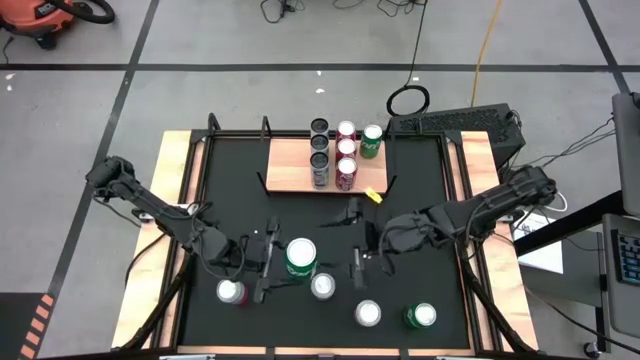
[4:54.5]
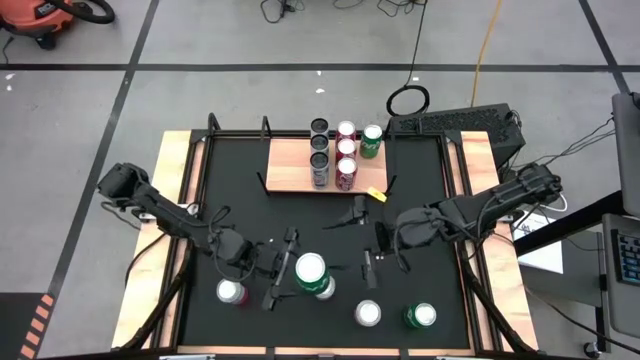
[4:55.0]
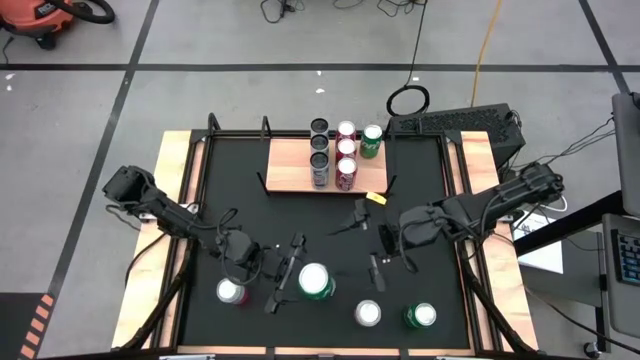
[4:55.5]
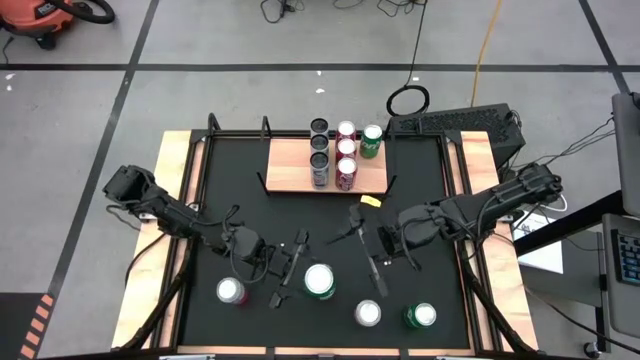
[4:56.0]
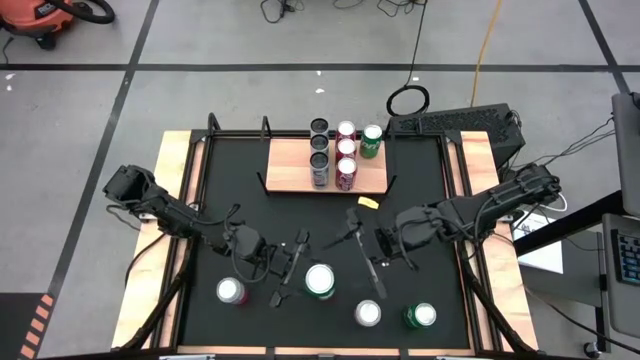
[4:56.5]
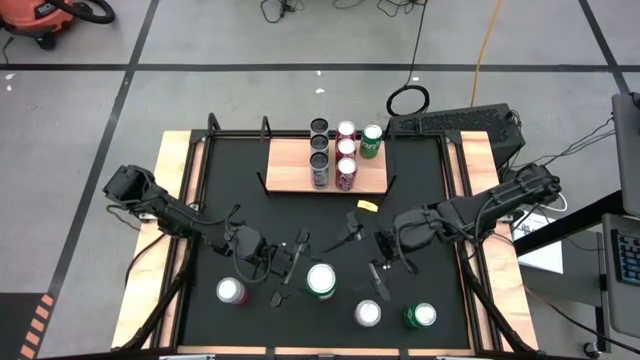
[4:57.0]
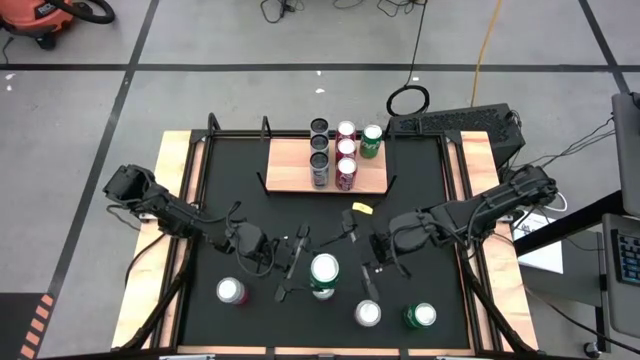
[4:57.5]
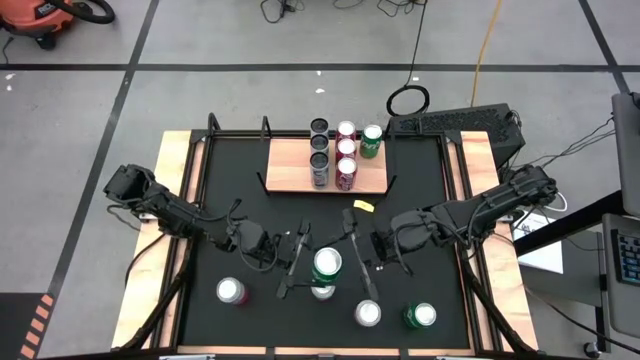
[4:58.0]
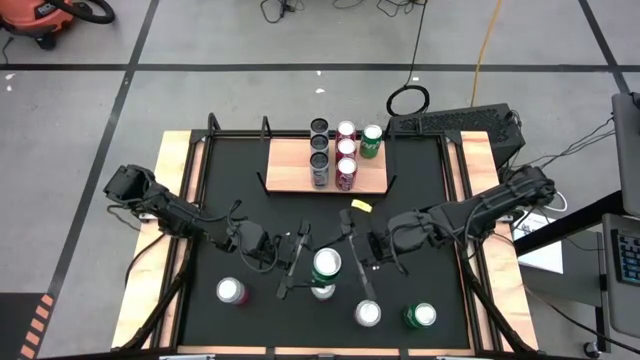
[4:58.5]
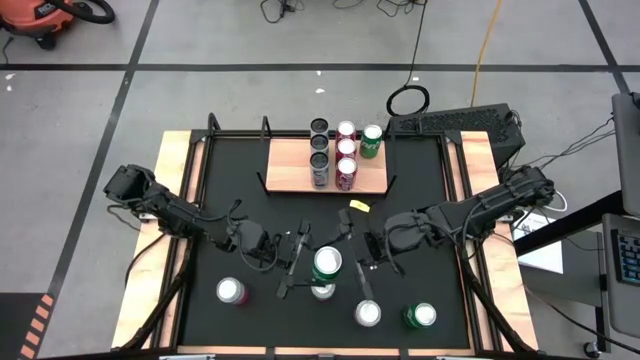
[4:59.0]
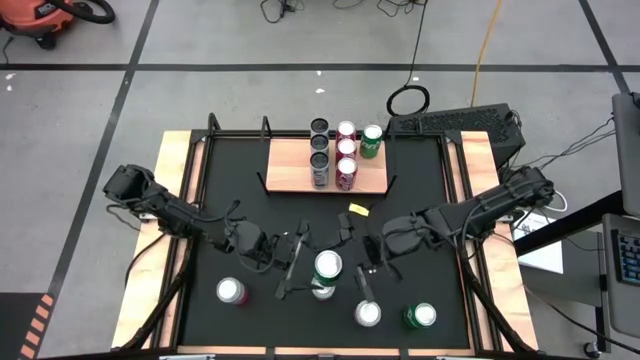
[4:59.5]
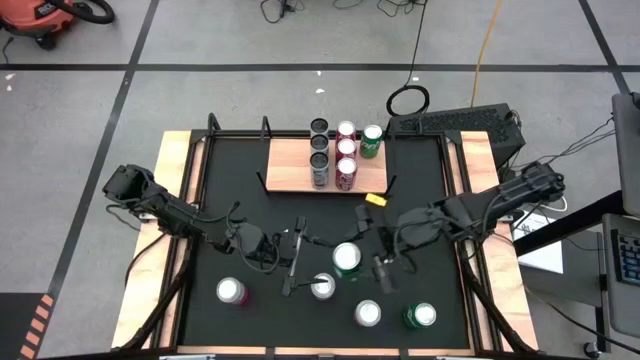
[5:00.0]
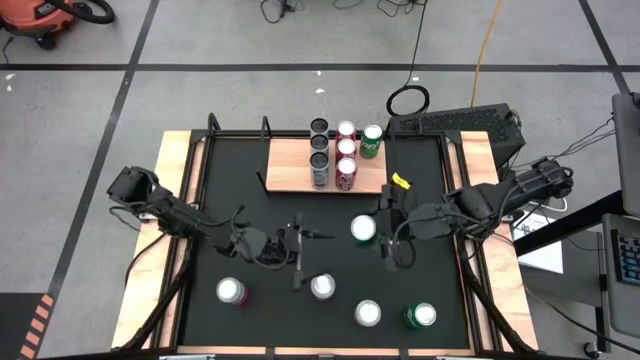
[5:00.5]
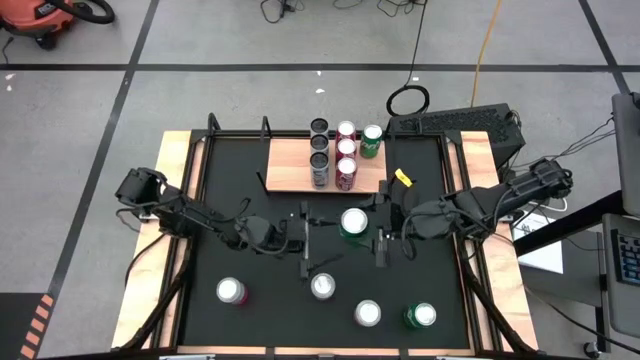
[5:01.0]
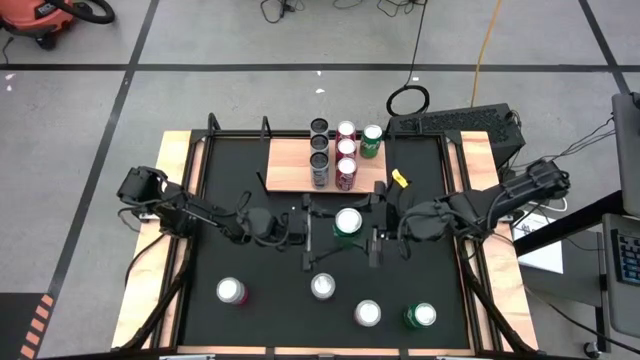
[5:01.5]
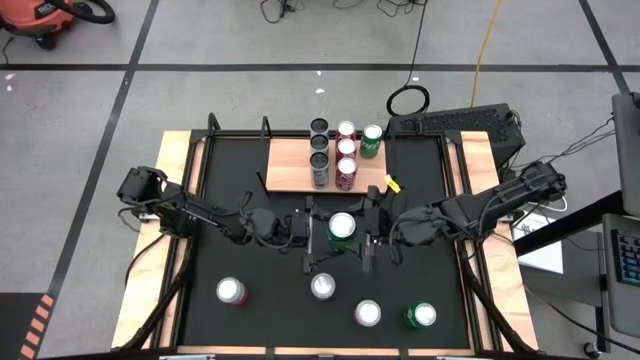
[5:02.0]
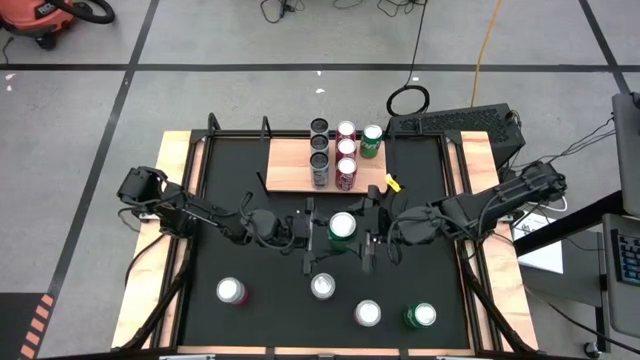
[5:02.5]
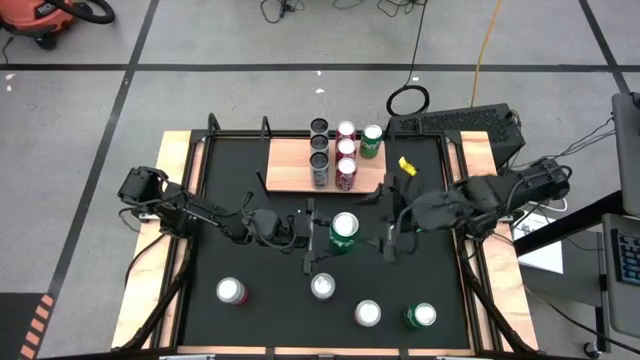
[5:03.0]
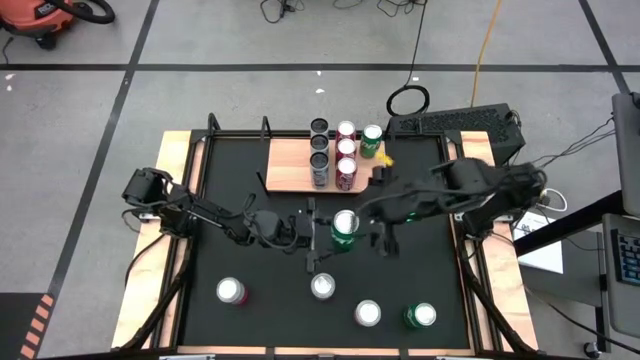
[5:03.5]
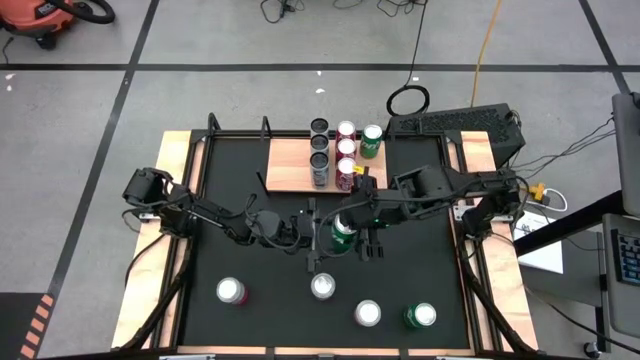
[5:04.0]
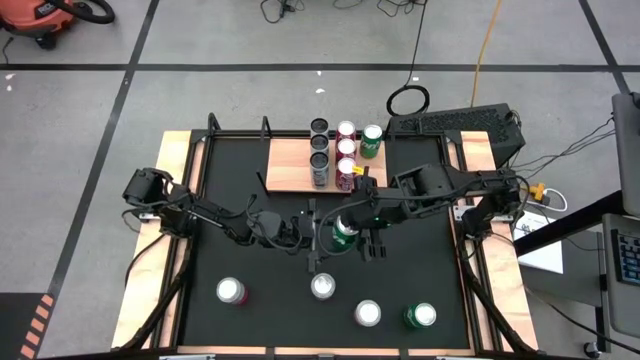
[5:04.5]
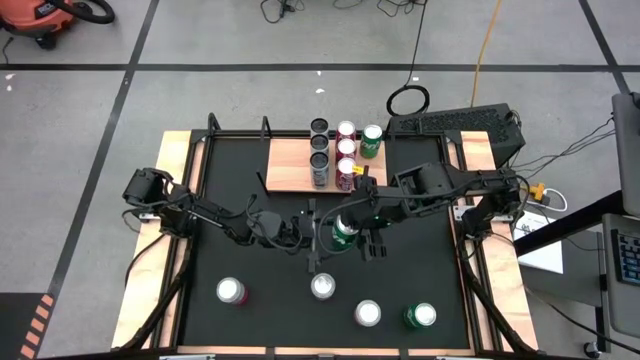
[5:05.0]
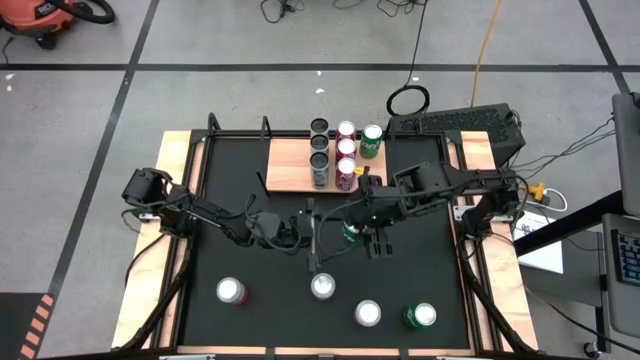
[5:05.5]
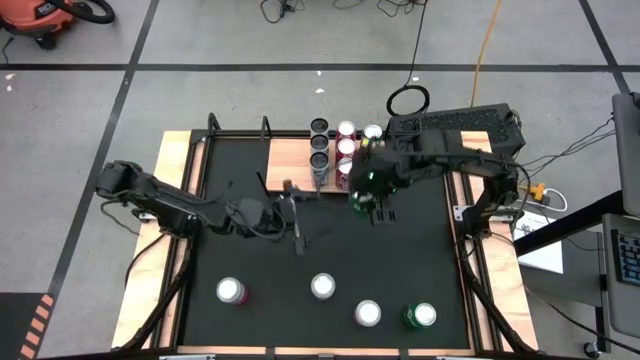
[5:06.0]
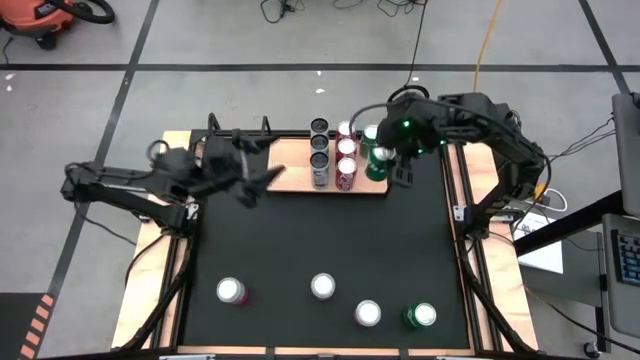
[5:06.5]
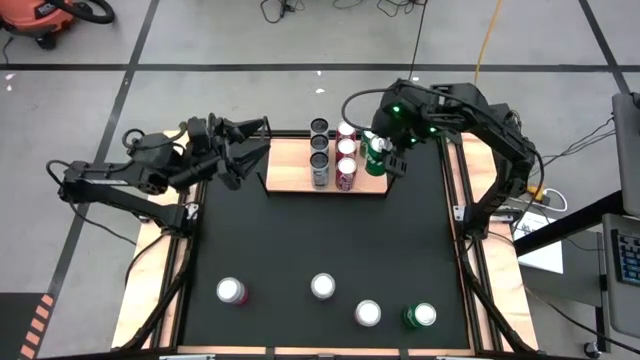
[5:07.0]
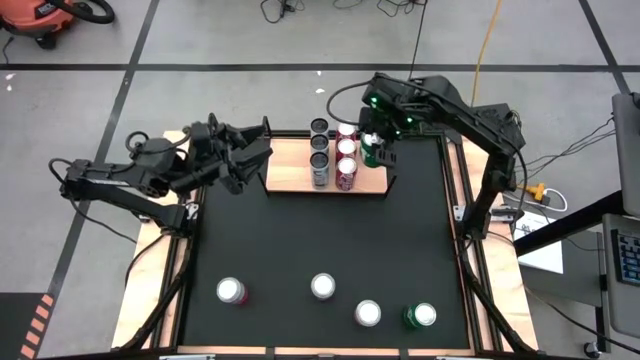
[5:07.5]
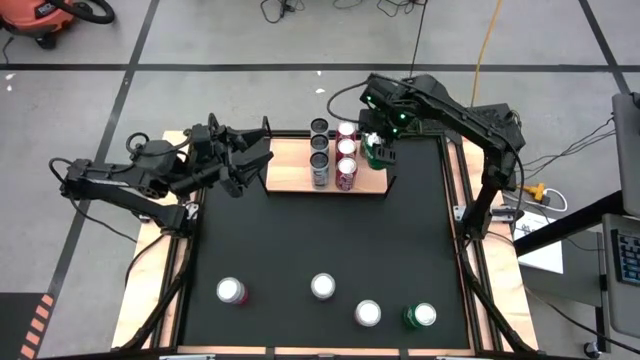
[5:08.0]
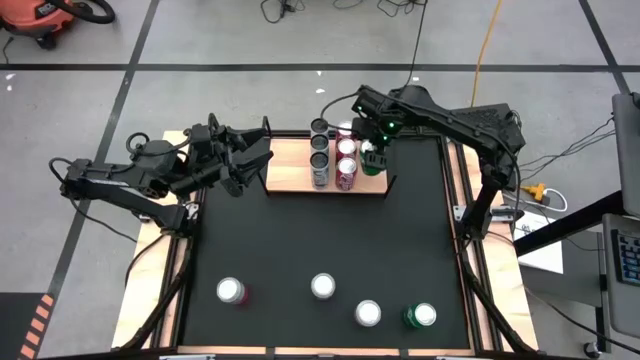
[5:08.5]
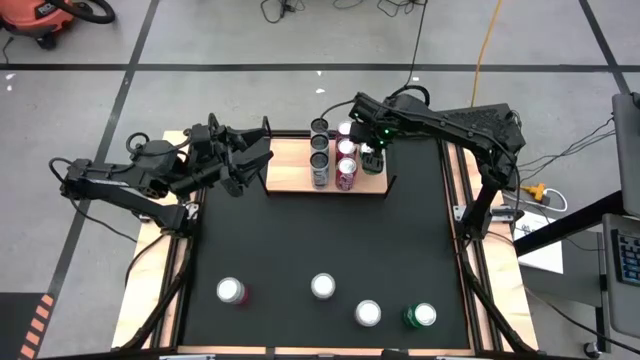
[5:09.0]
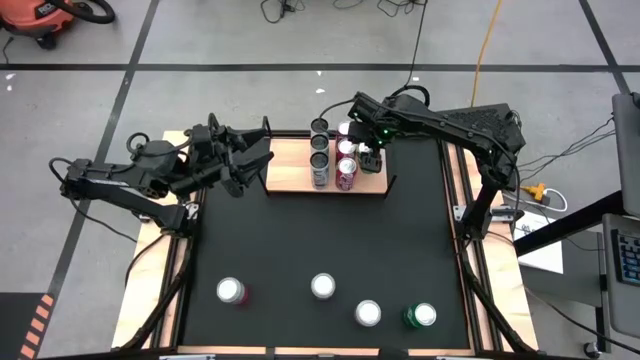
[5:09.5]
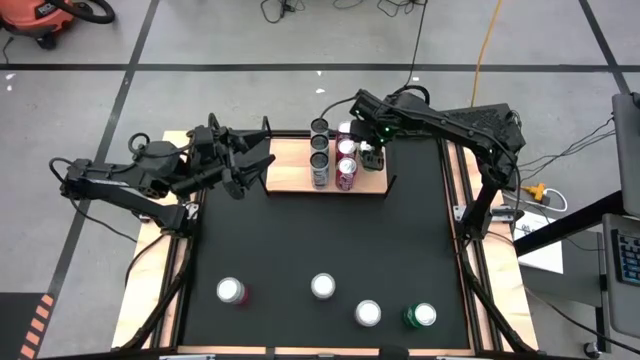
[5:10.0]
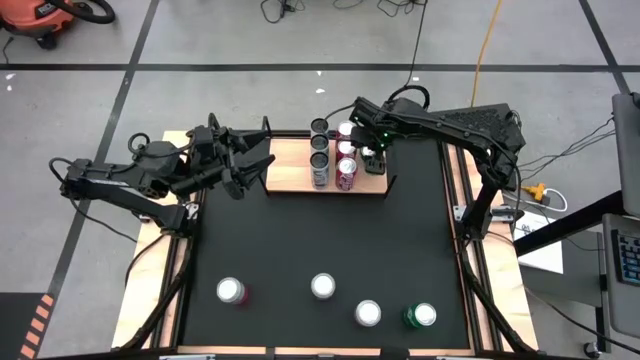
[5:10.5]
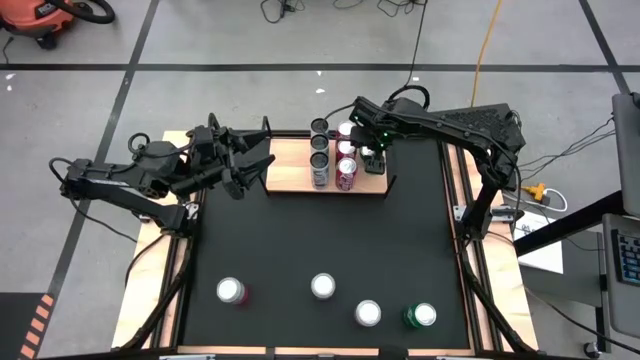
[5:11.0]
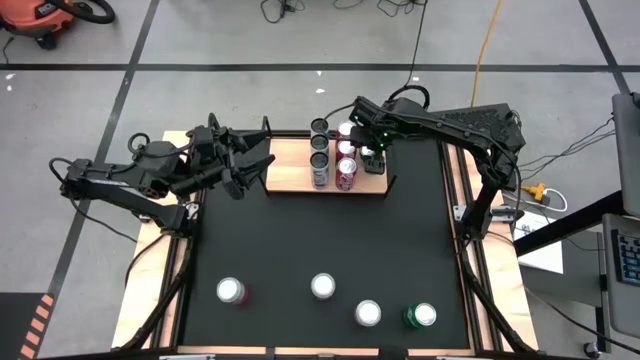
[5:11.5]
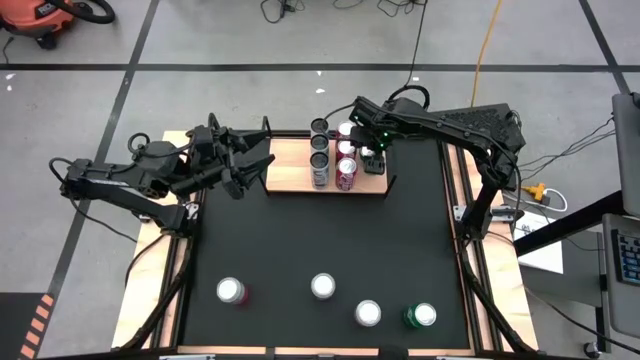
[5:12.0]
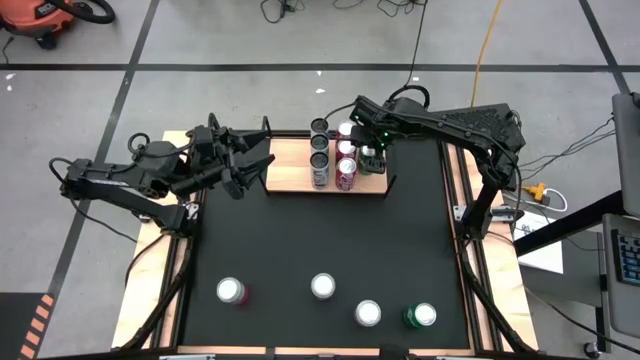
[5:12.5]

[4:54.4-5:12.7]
Task: Place canned beverage on shelf
Put the top left green soda can on the shelf

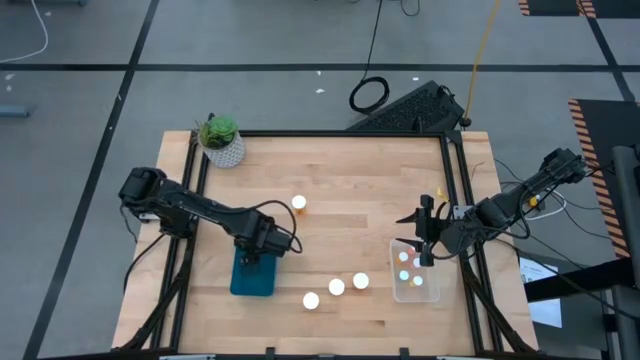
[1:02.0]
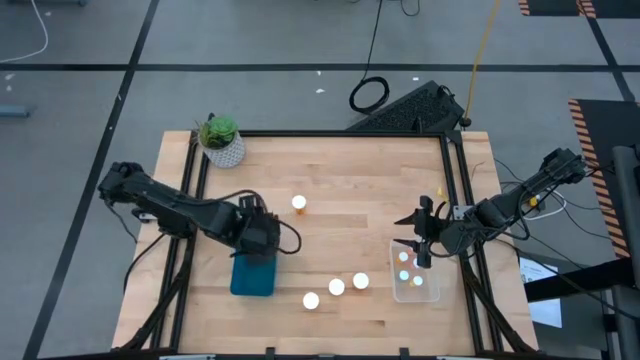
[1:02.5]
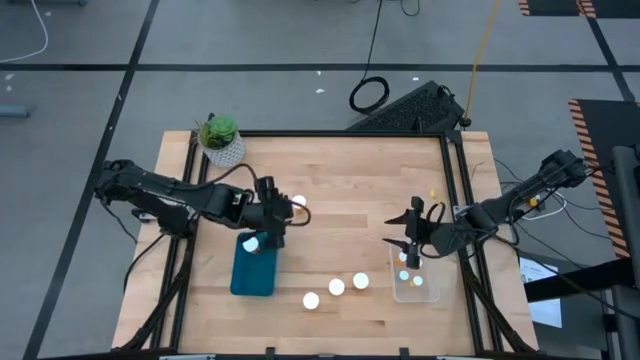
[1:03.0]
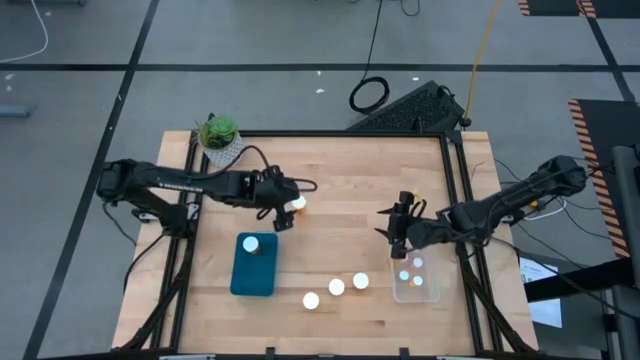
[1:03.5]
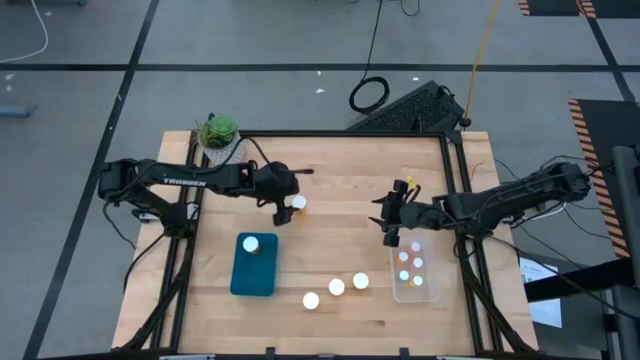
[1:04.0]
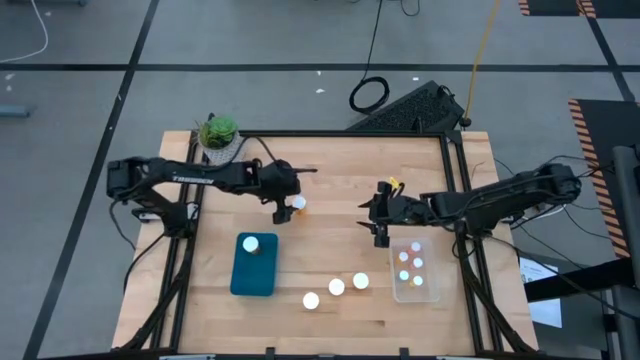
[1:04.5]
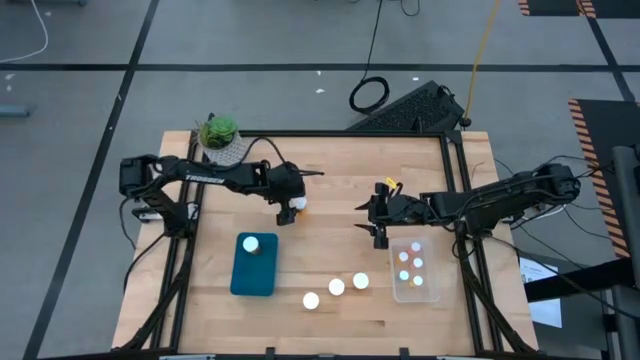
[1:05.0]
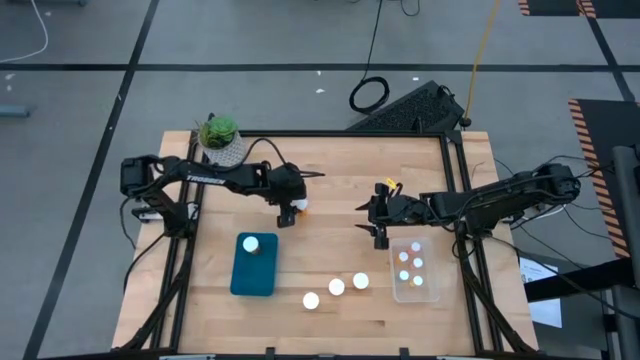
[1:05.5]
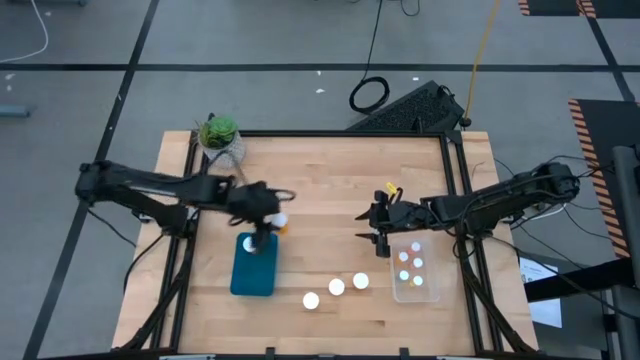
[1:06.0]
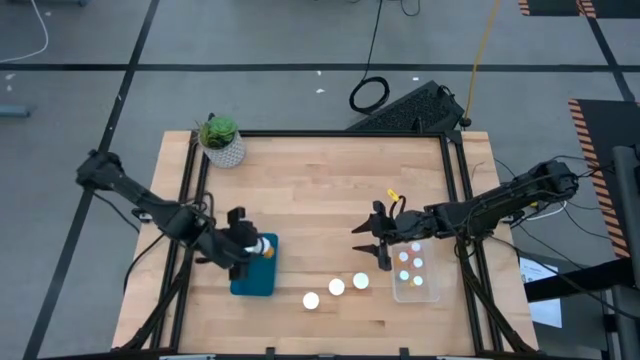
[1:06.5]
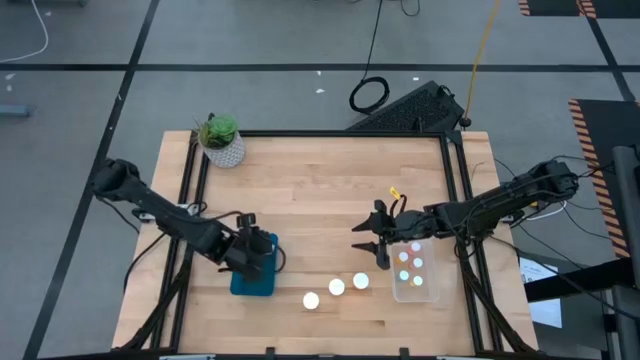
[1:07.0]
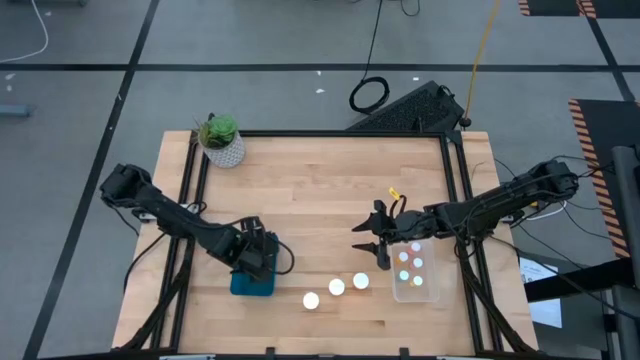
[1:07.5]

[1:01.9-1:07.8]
Task: Pick and place medicine bottles into bin by pill shape (circle, oval)
Put the orange bottled capsule into the blue bin
